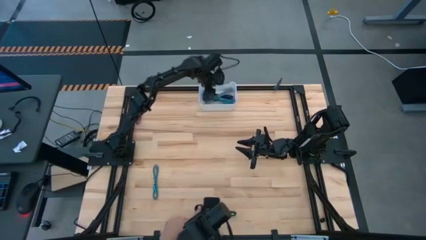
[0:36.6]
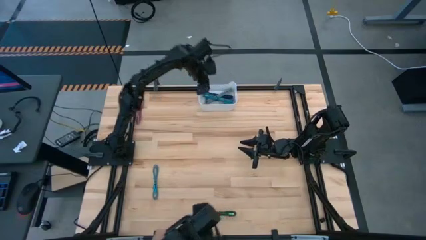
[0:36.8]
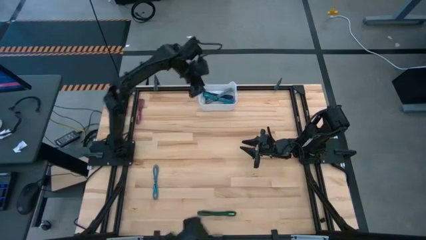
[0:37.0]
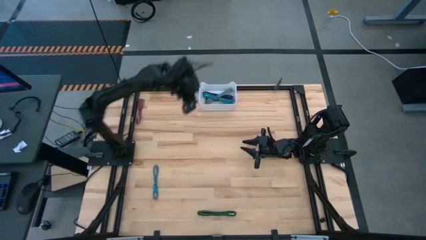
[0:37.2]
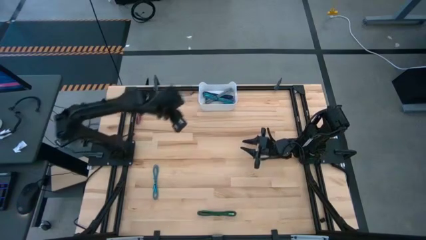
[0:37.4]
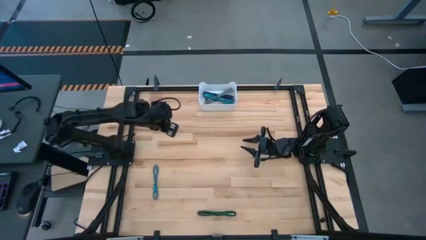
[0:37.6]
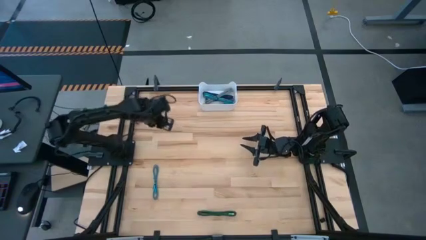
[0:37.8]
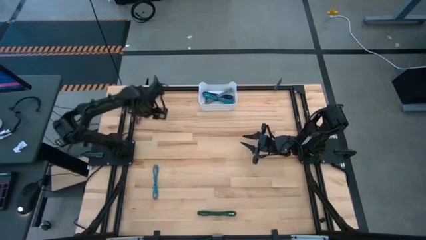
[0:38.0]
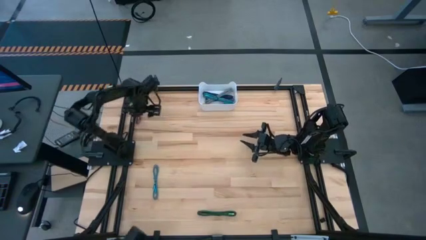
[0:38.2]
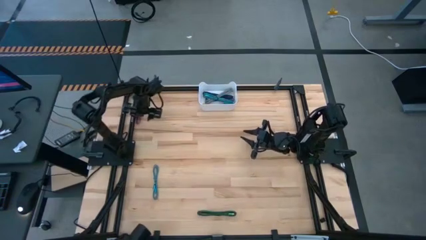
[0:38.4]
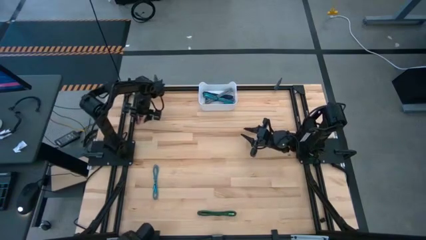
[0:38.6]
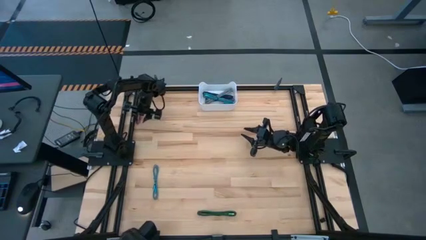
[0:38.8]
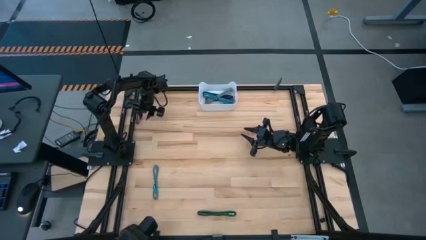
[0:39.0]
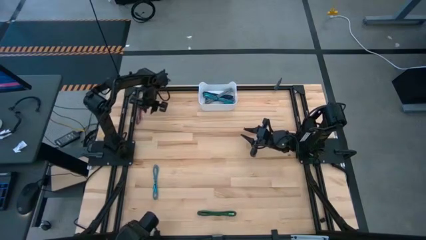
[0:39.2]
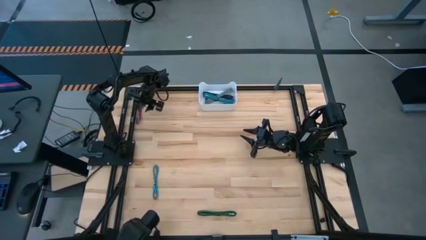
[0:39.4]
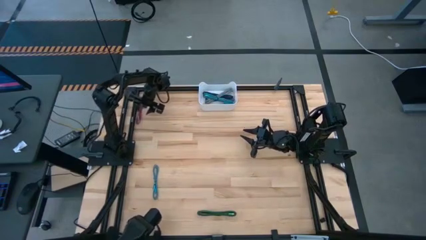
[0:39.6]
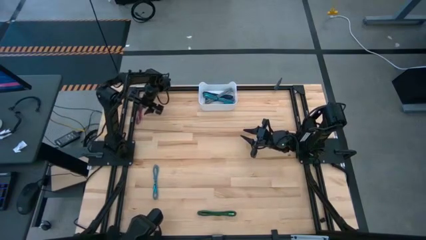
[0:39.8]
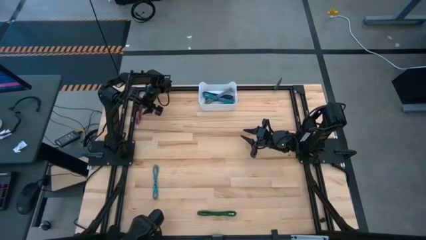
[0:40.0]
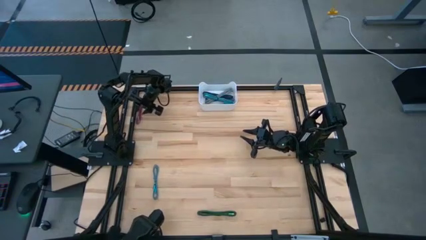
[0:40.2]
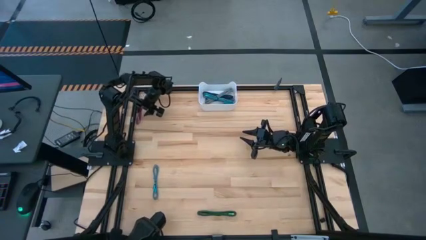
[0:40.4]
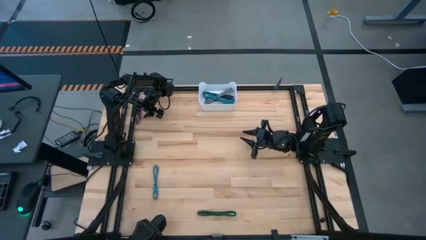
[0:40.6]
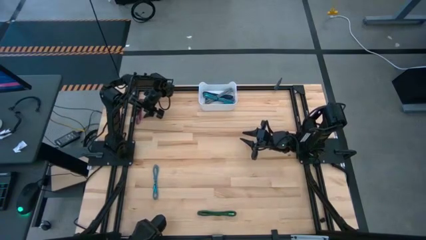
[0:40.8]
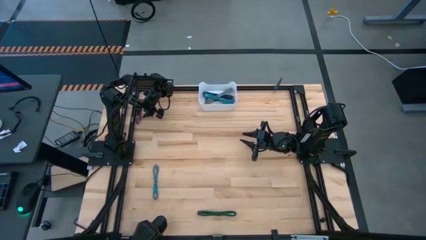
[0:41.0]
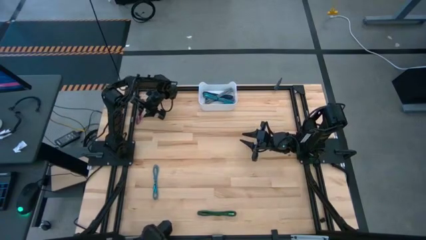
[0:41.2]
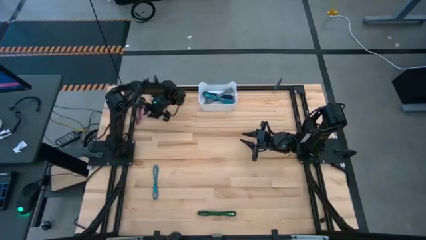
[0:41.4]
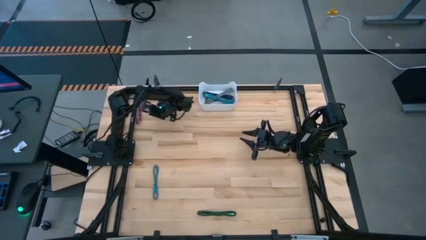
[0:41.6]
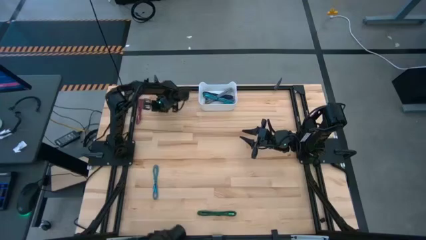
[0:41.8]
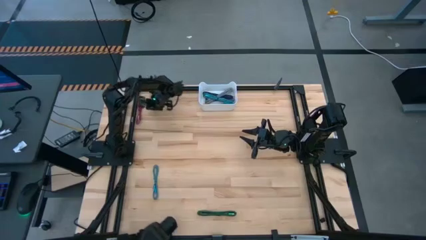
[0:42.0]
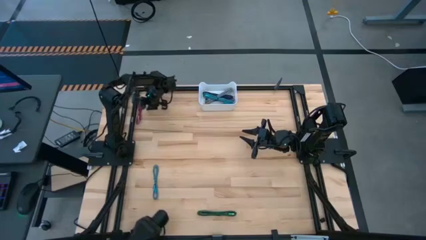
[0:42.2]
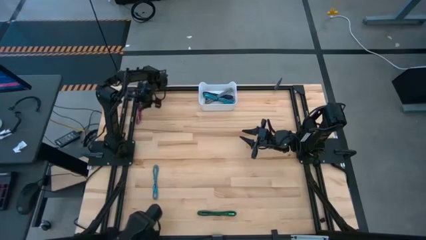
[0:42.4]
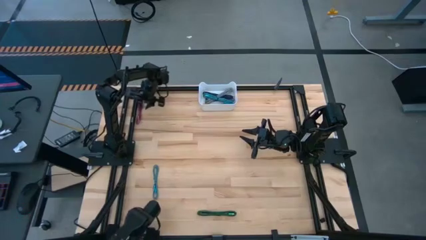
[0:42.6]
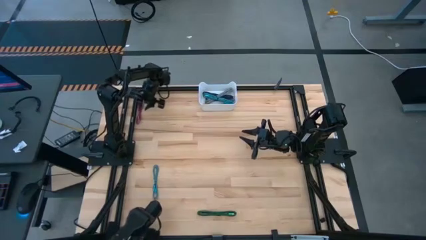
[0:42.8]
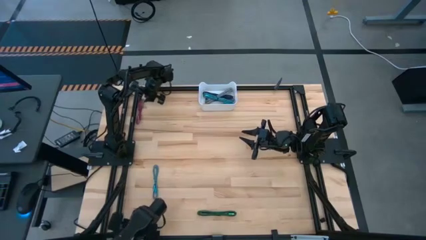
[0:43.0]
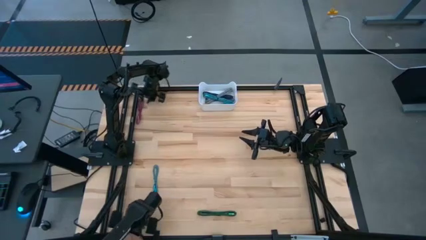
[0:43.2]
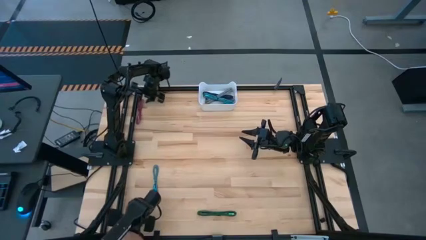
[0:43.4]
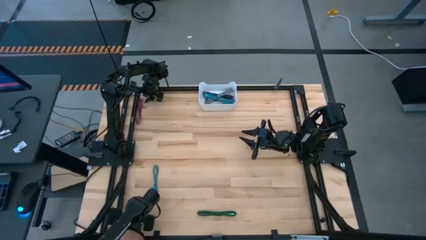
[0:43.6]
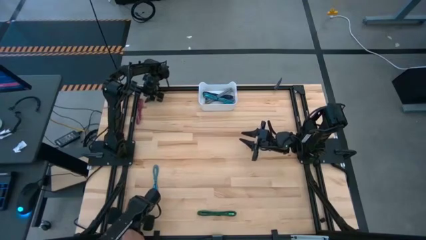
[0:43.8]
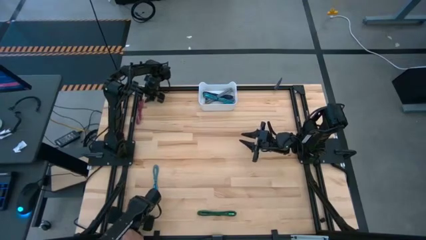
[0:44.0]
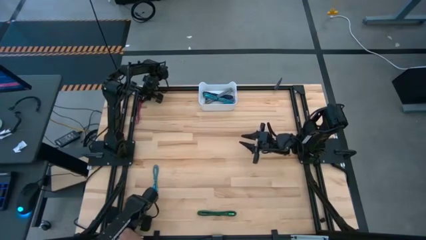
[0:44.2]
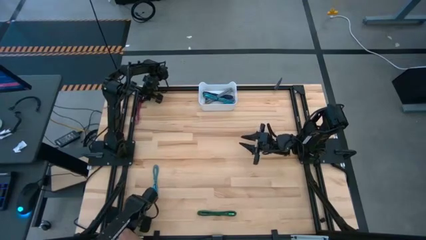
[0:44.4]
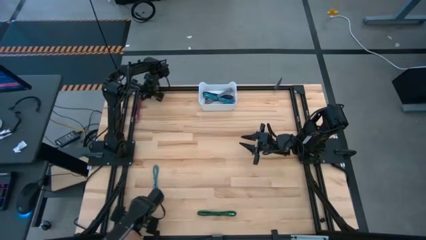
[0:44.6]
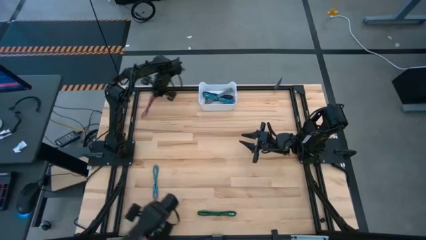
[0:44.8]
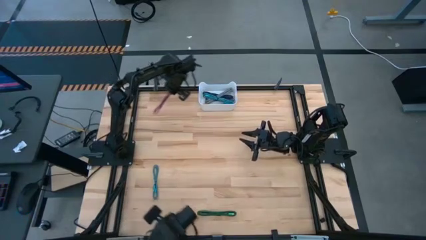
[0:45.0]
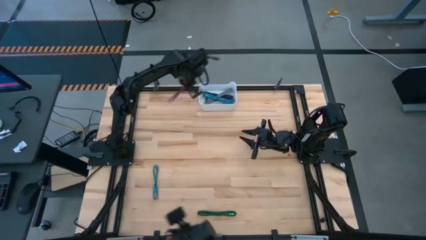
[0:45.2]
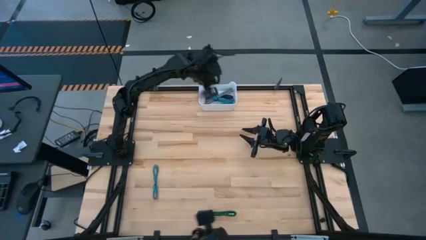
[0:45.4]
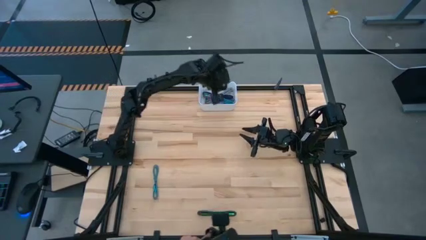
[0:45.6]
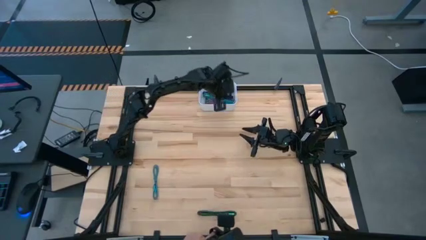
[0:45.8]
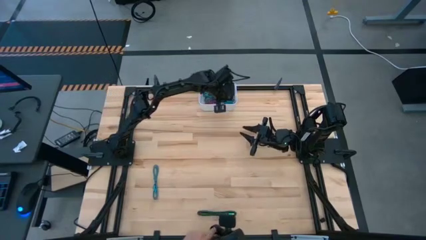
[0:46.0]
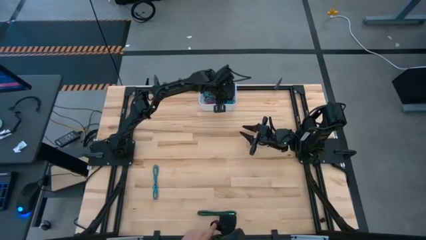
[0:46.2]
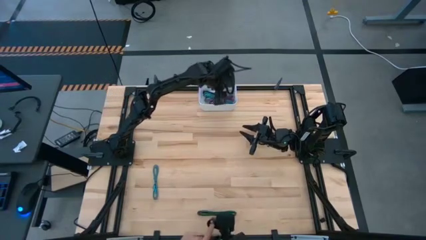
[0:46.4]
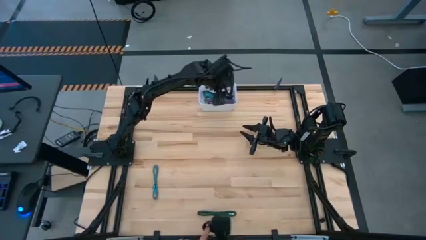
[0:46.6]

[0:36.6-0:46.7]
Task: Pick and place USB-C Cables
Put the red charger cable into the white bin

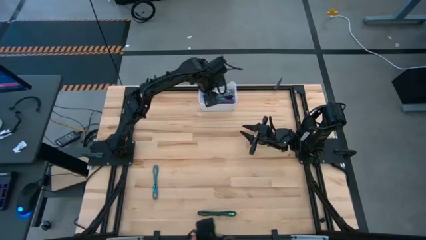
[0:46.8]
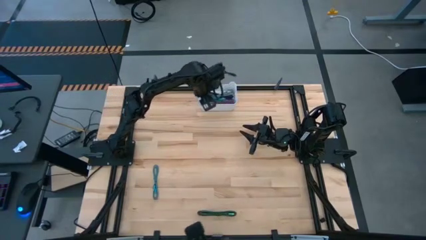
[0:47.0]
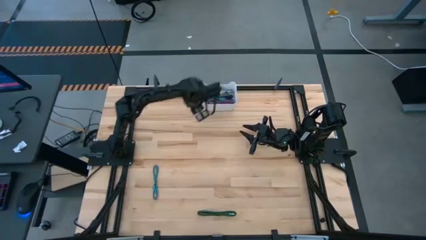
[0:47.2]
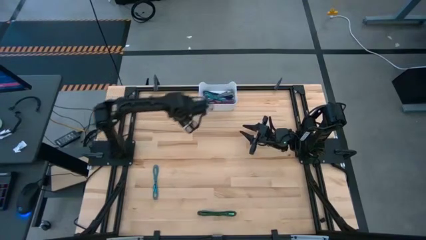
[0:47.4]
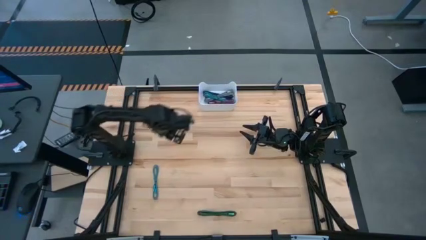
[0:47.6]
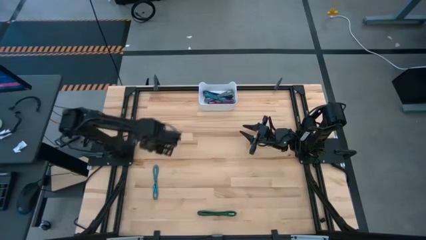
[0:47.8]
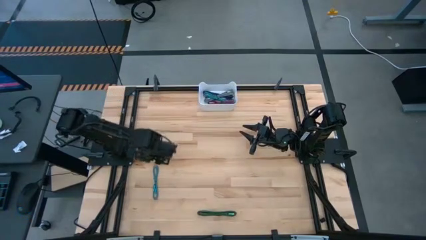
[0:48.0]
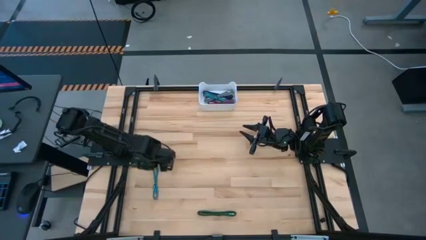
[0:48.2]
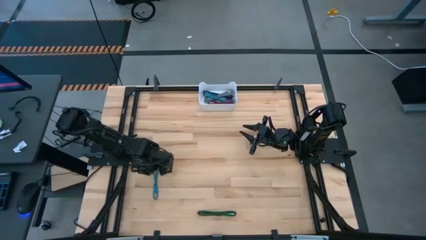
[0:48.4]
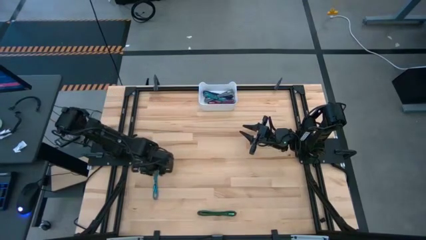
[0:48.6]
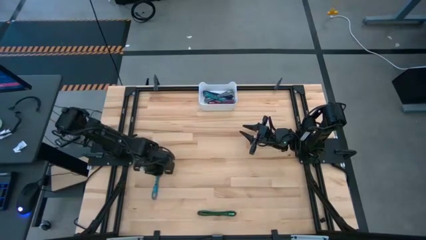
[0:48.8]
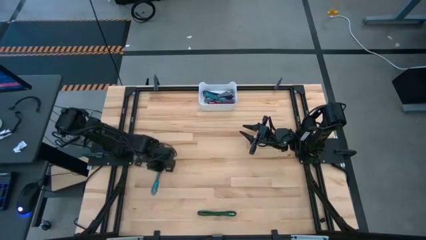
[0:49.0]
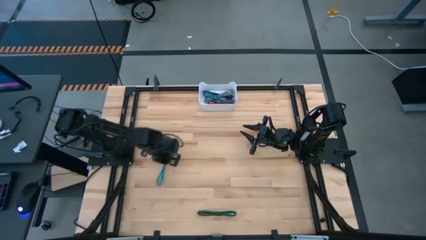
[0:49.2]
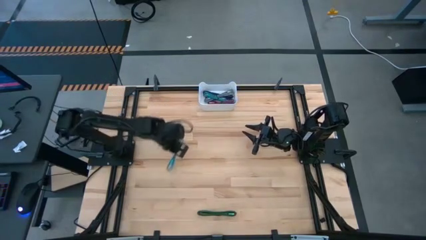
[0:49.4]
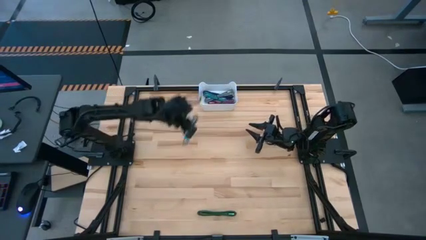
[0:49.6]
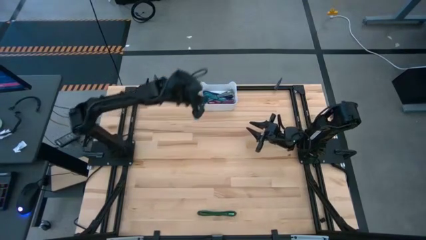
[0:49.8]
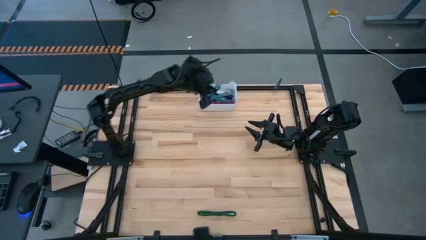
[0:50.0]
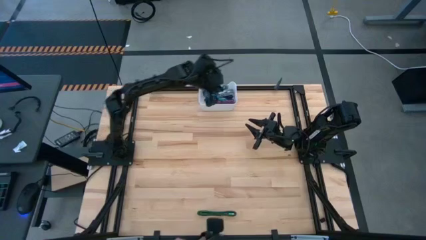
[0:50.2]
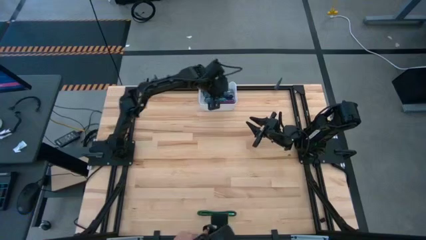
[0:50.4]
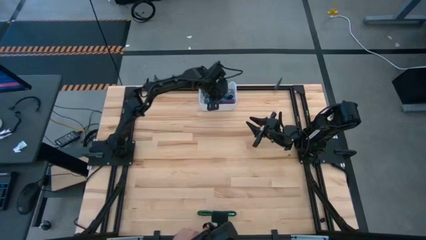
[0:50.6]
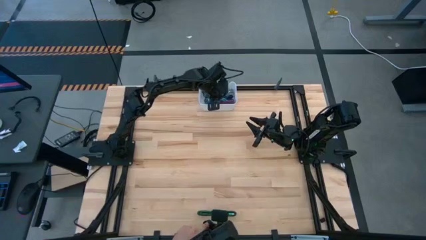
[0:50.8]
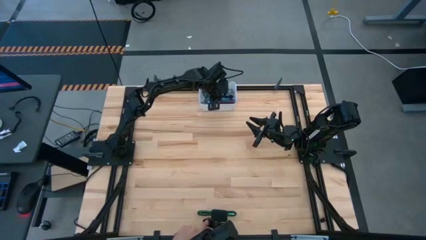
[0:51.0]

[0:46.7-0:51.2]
Put the light blue charger cable into the white bin

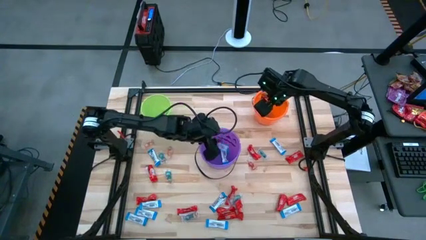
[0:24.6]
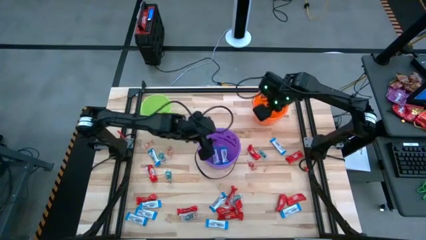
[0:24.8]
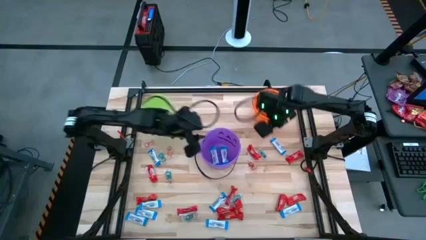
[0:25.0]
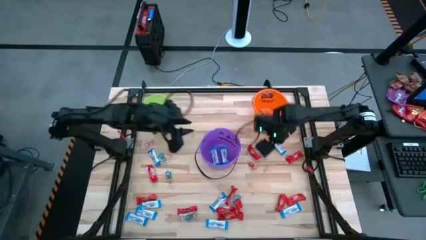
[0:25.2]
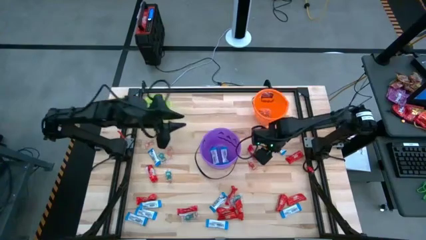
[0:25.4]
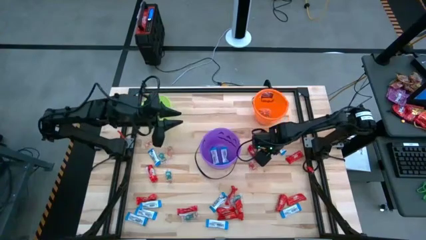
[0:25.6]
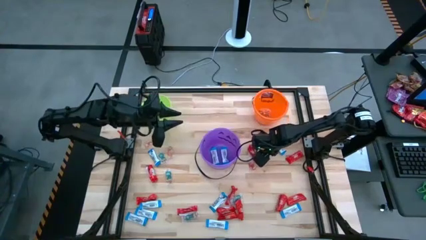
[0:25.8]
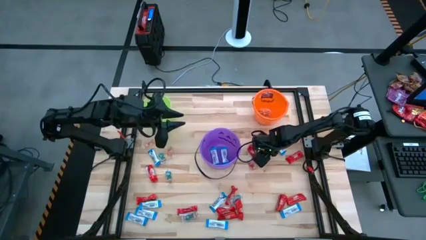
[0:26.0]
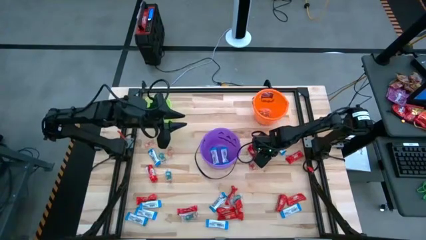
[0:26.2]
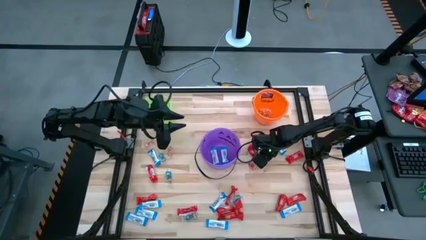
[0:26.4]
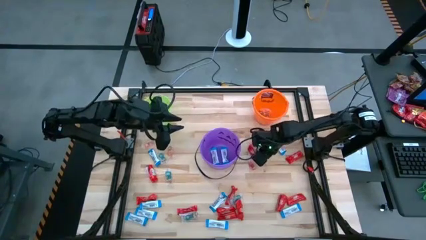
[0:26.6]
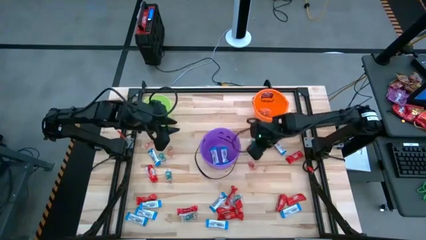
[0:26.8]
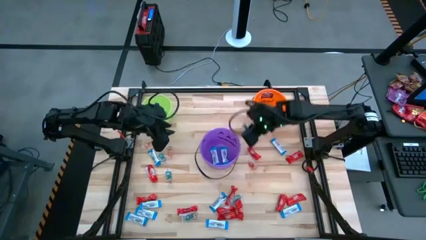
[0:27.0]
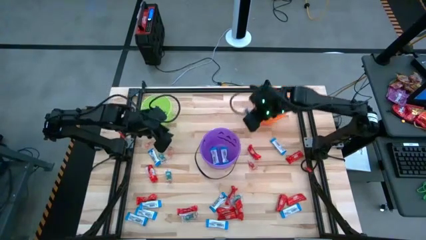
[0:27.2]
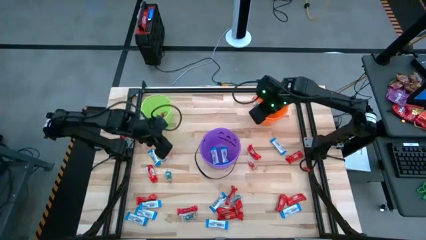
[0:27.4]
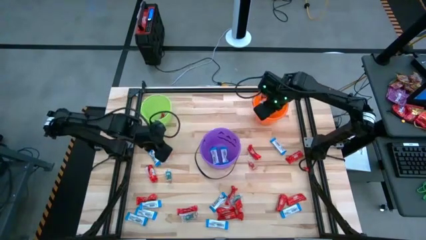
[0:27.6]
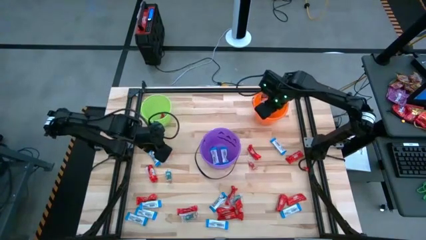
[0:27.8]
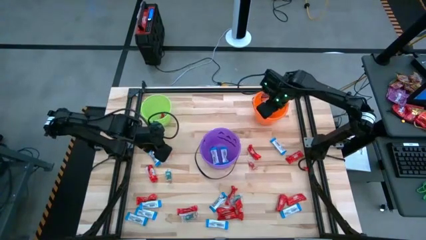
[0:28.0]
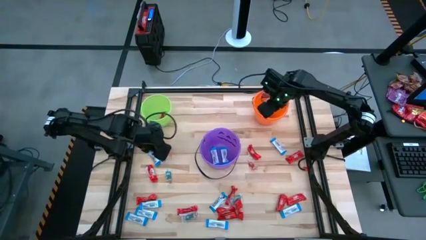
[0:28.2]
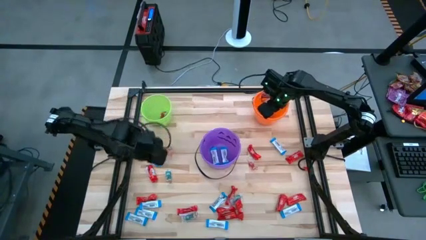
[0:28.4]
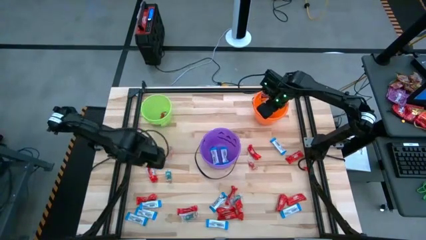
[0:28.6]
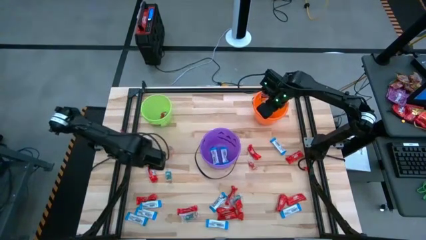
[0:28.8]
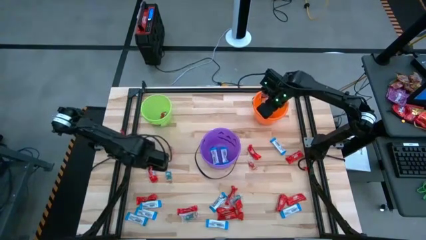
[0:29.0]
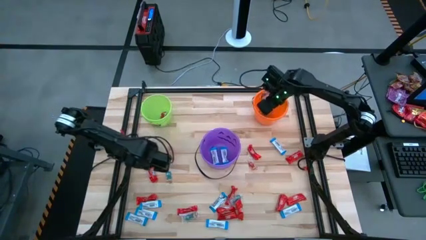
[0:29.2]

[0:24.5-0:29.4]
Task: Sort candy by brand, put in halloween buckets
Put the blue gummy into the orange bucket
